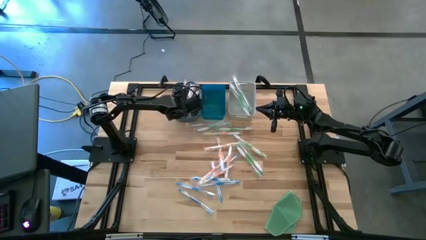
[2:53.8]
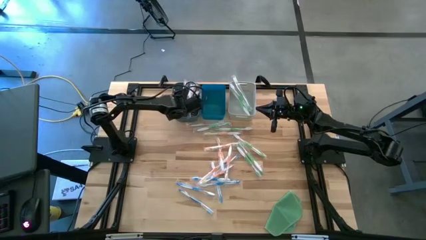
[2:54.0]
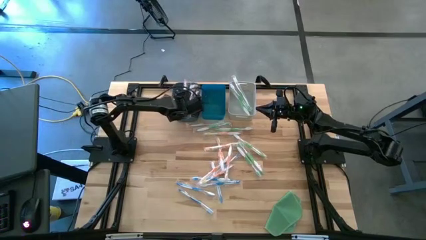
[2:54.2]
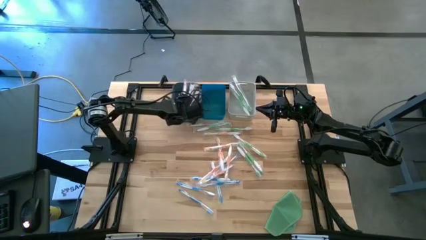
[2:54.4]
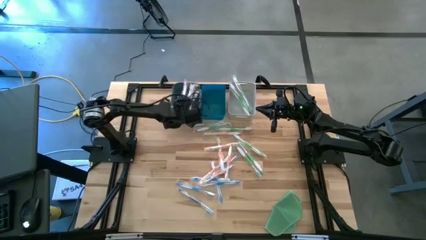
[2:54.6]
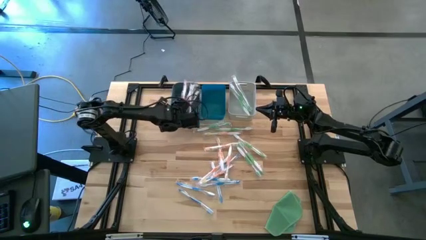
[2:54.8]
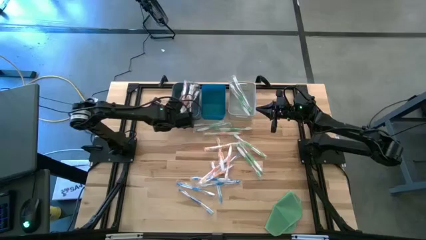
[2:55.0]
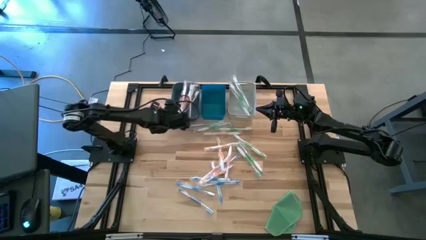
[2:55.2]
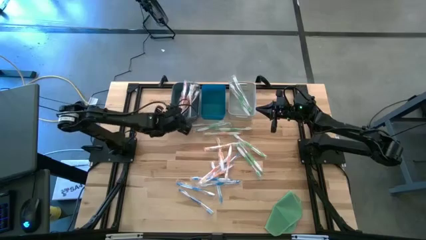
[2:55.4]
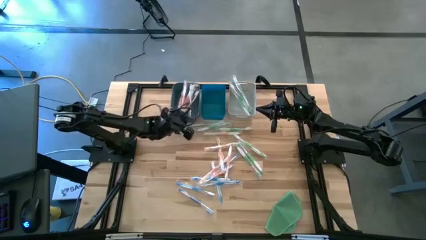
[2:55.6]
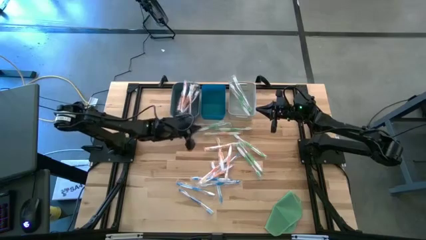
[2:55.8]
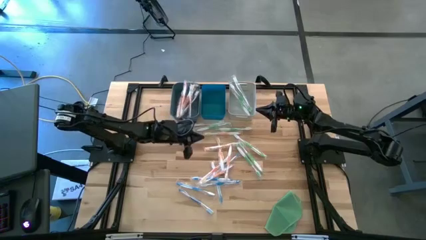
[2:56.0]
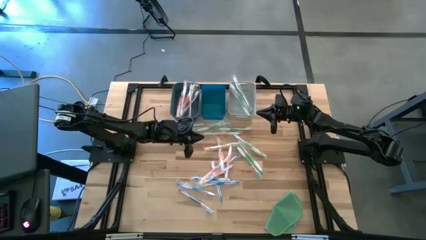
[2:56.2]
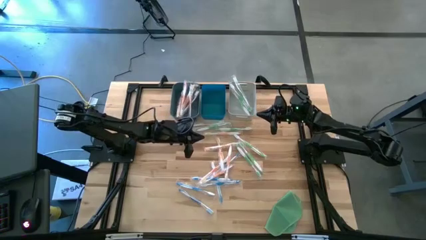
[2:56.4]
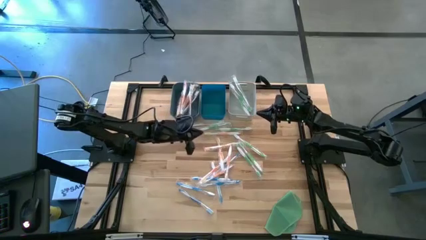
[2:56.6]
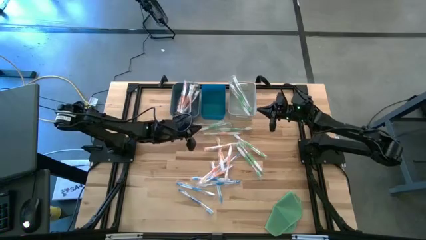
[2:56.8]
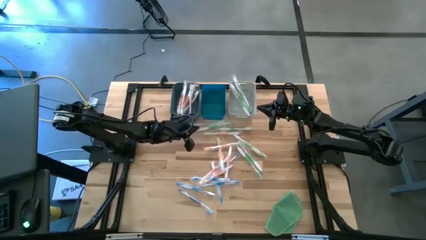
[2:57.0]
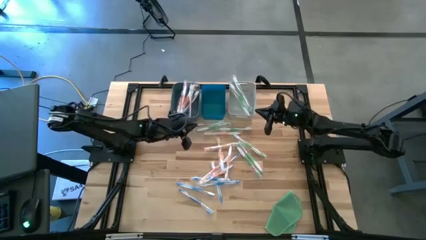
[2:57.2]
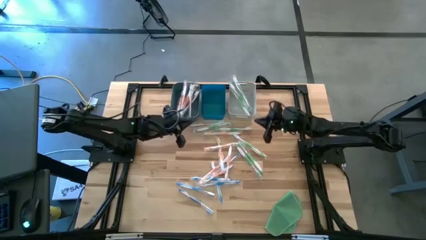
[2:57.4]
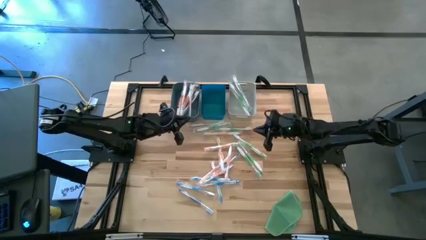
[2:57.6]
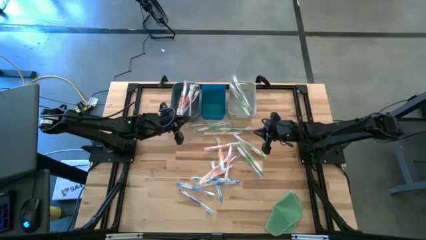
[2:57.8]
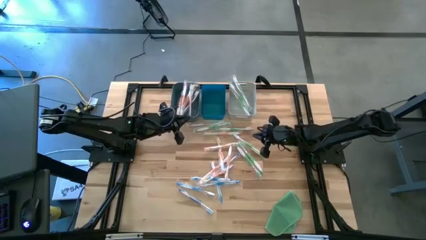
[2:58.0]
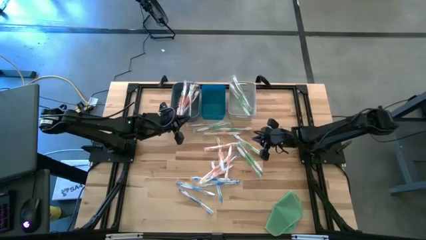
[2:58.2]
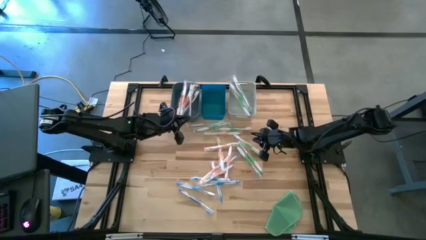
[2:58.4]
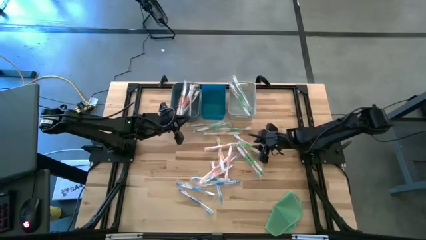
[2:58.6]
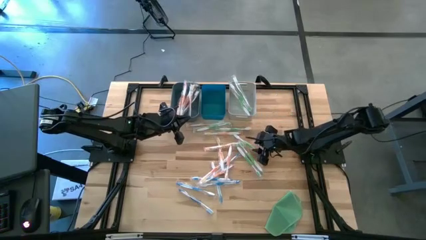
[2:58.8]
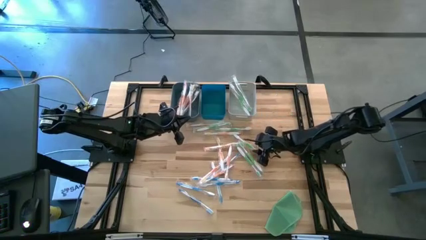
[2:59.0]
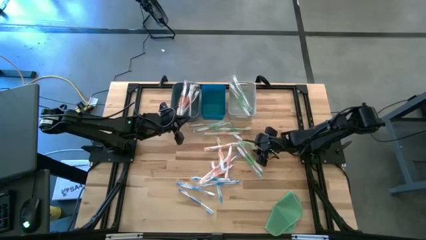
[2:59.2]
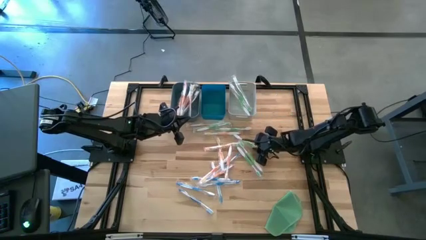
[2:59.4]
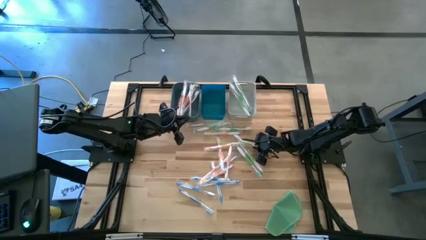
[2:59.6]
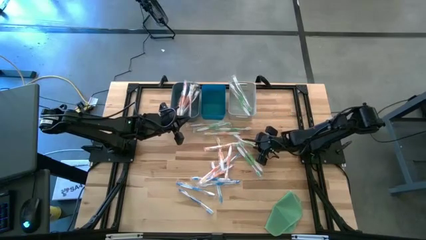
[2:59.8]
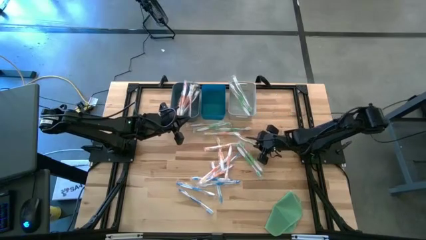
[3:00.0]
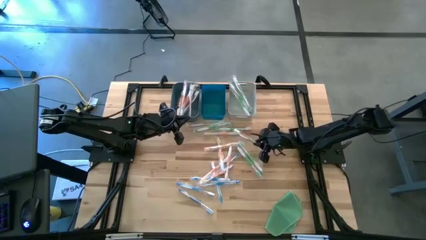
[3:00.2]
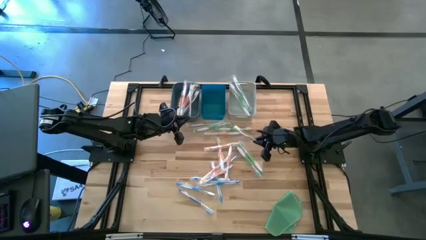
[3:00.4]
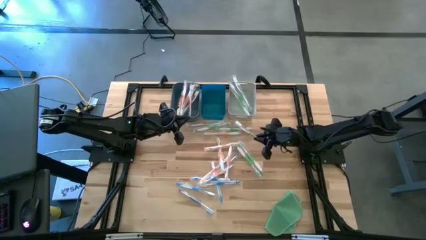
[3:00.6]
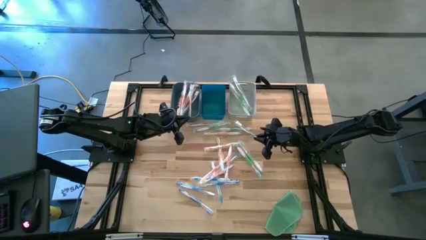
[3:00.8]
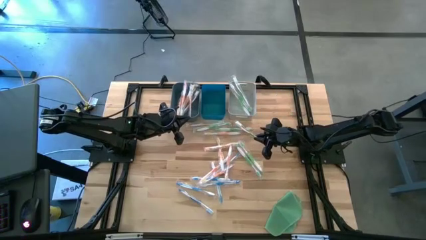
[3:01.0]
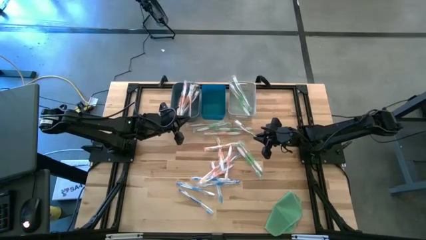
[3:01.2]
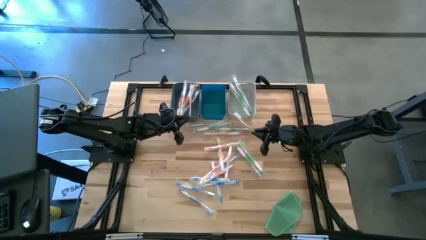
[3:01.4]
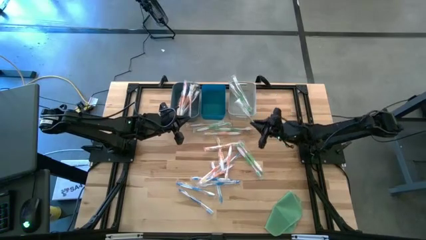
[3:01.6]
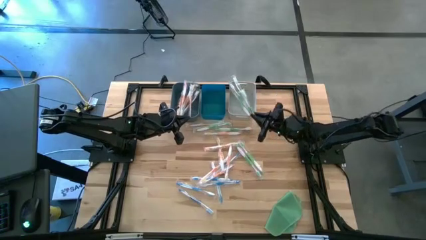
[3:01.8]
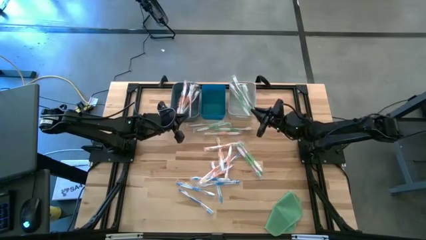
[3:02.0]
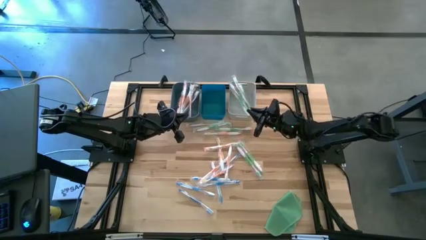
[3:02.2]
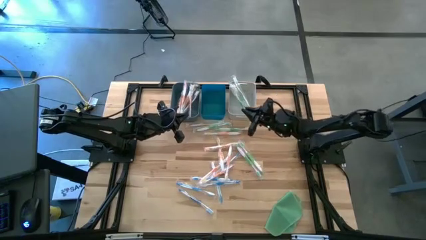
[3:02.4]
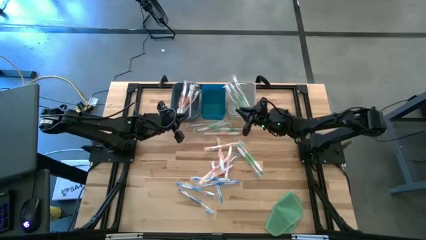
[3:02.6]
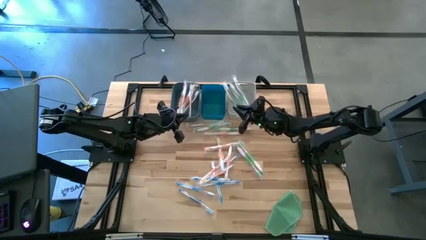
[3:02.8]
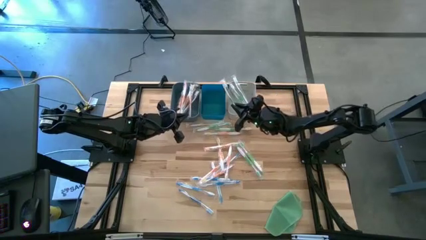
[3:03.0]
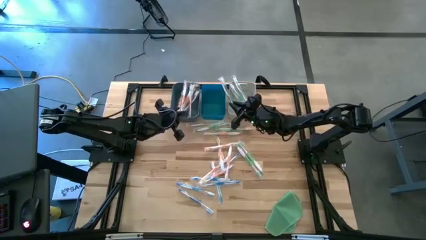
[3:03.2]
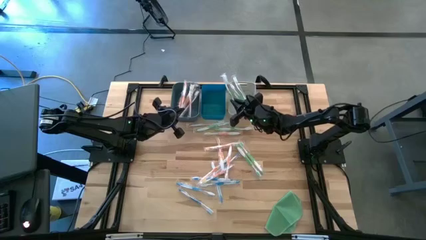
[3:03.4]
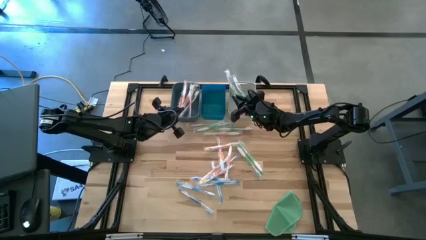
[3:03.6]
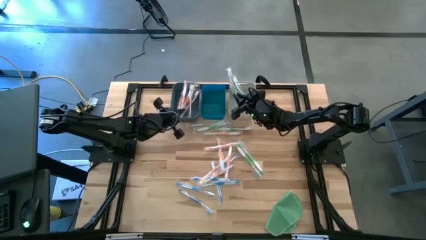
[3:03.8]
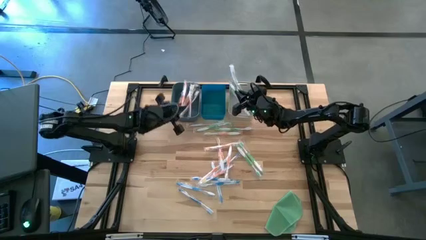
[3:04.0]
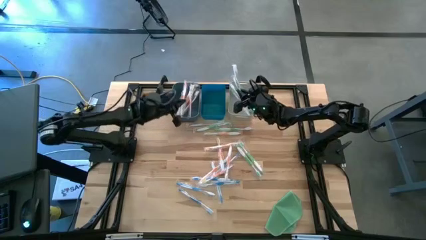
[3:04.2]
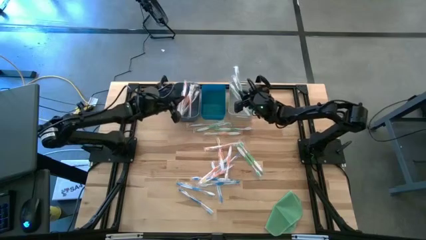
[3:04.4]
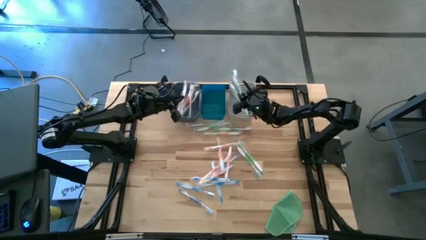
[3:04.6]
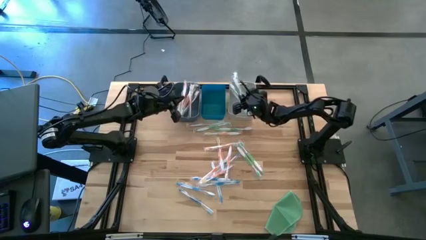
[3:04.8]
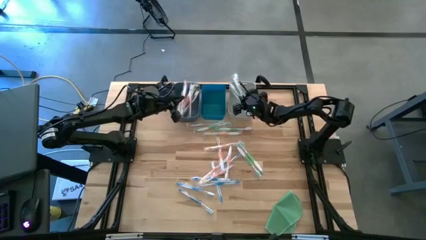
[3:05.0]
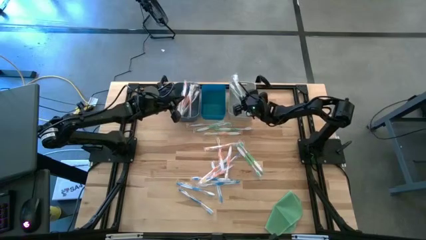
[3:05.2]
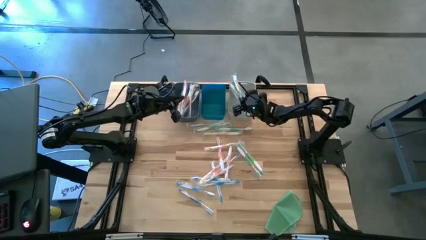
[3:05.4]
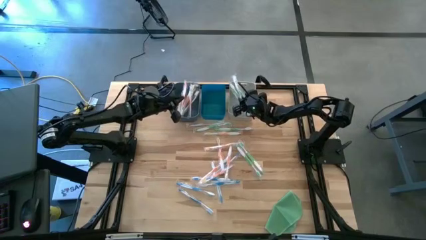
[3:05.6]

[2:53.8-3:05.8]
Task: Pick & Place Toothbrushes
Put the green toothbrush into the white bin

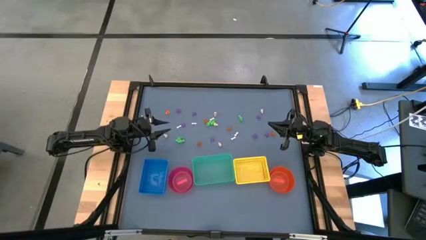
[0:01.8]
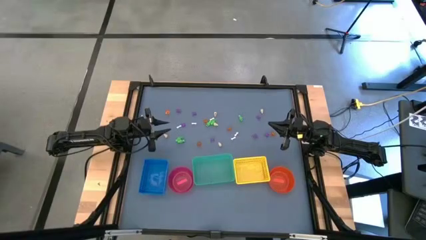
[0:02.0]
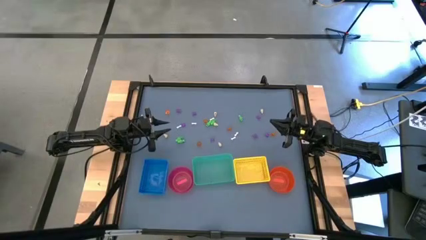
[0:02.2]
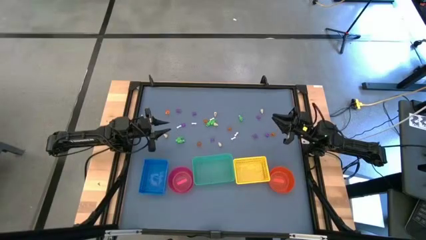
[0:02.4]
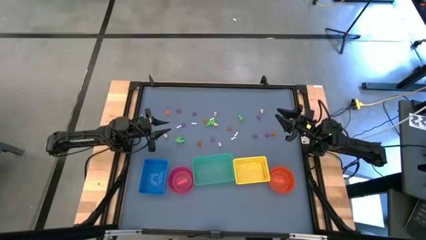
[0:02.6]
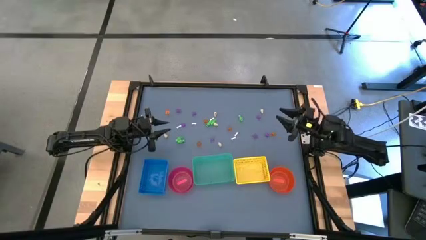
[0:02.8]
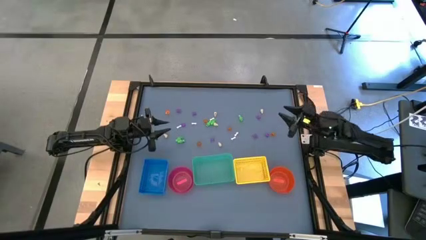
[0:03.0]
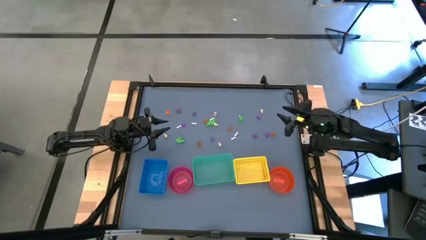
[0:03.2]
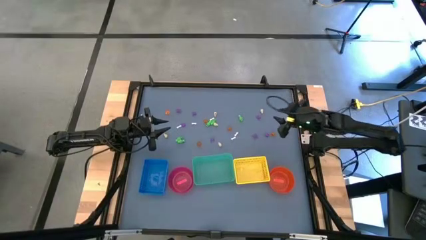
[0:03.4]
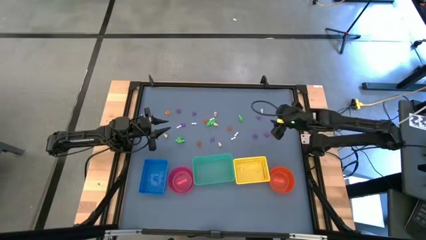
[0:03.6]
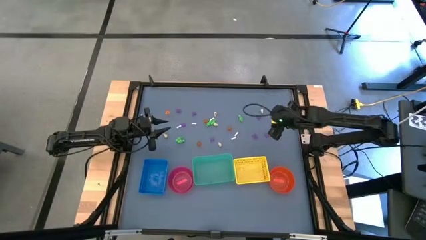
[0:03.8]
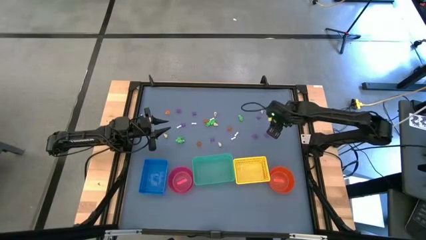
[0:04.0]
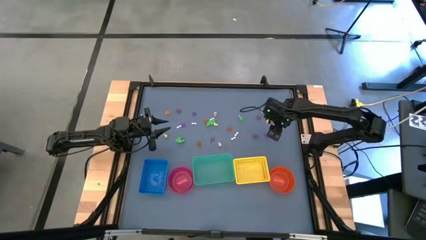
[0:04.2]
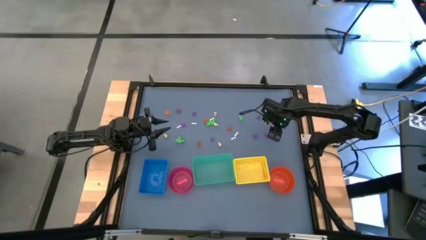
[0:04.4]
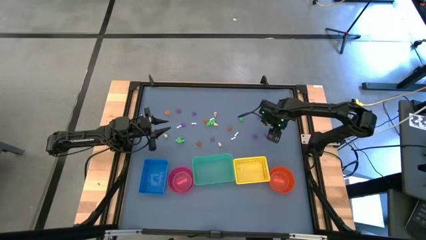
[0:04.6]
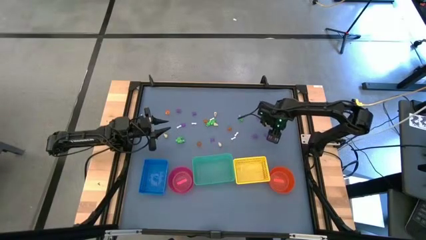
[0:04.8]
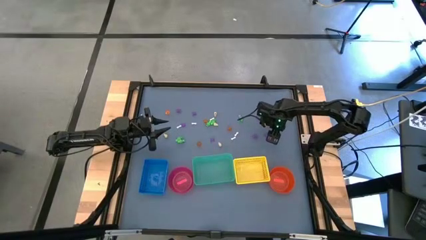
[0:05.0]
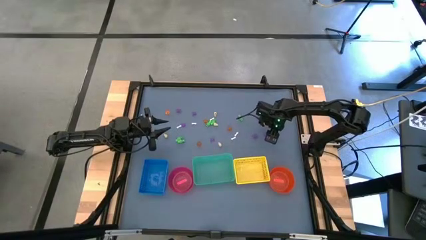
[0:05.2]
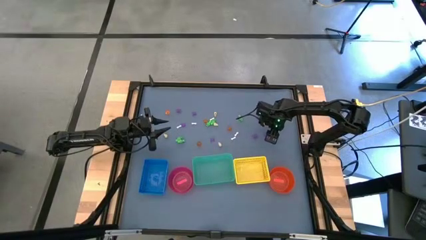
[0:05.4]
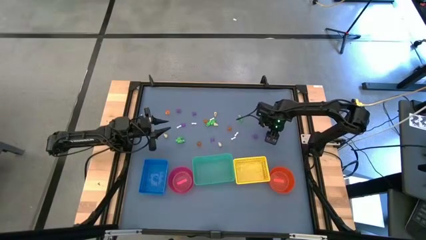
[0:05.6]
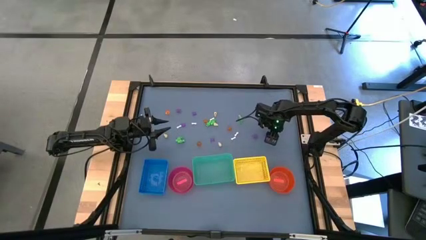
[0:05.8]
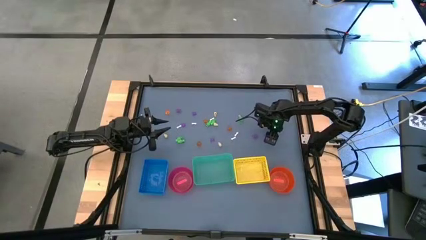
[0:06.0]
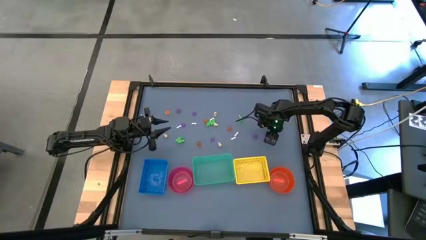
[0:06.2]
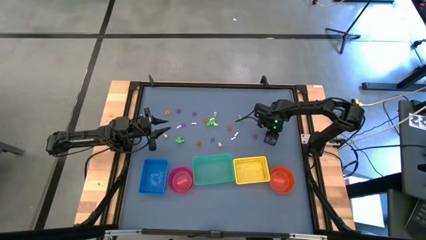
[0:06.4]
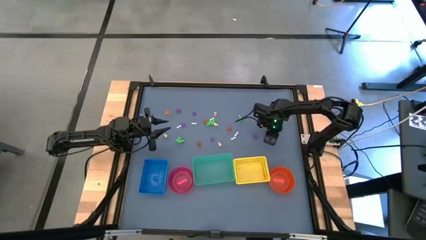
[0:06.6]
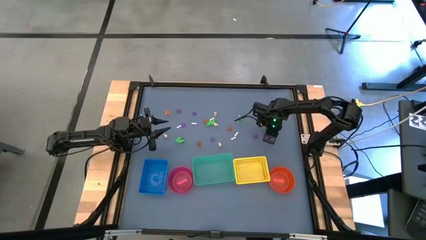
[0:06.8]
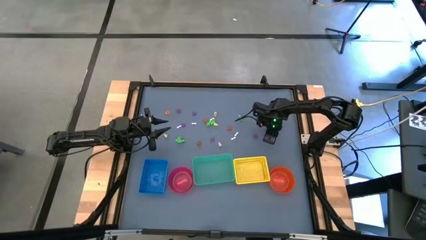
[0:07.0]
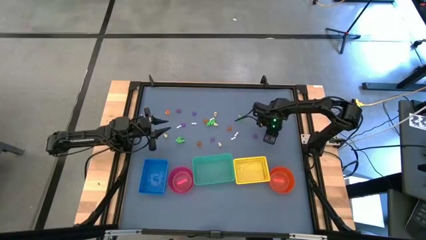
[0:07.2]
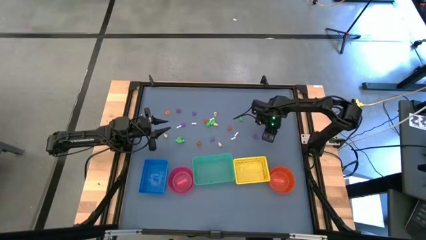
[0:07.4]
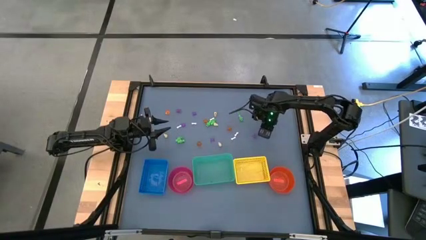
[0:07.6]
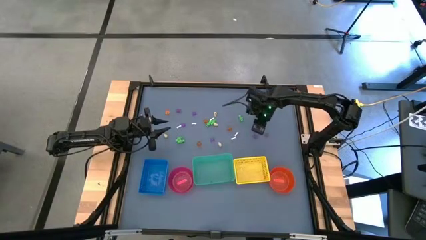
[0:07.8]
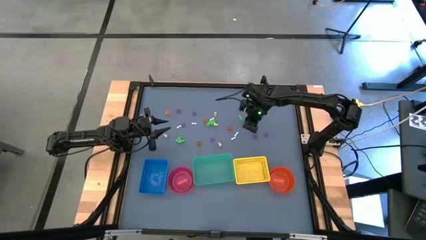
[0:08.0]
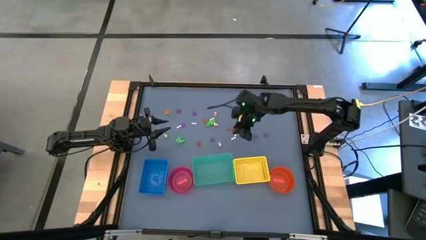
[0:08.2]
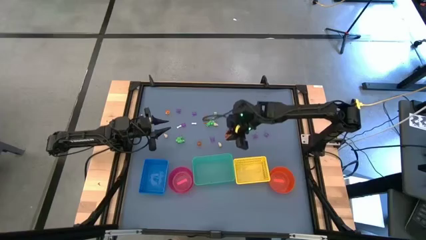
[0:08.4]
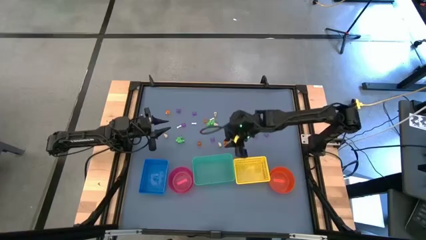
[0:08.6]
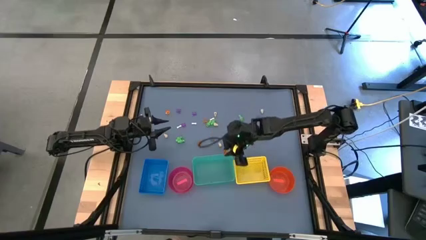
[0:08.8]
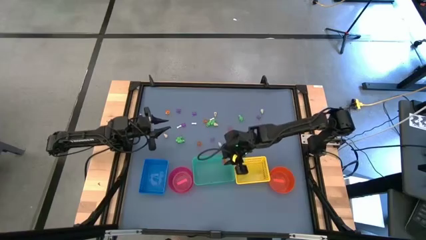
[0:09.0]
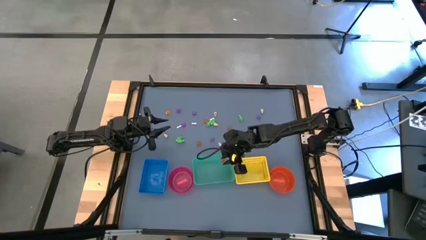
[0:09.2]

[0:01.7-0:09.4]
Task: Sort Halloween decoration
Put the orange pumpkin toy into the green bin
